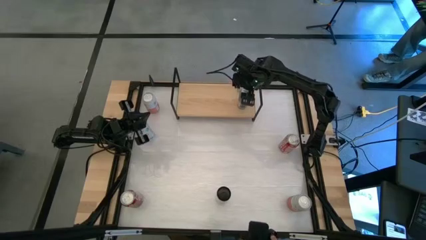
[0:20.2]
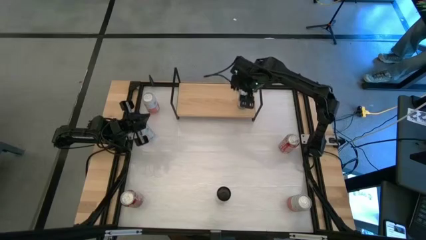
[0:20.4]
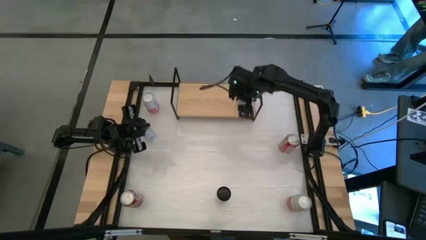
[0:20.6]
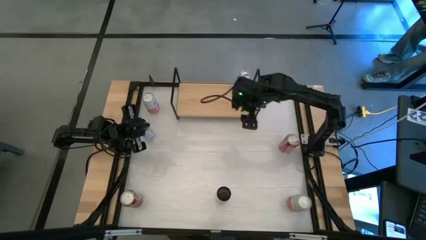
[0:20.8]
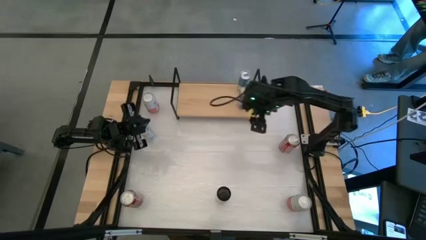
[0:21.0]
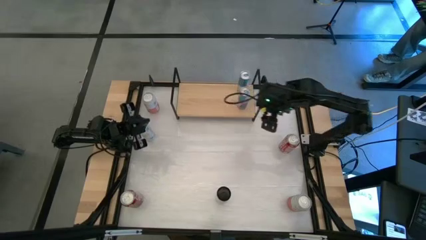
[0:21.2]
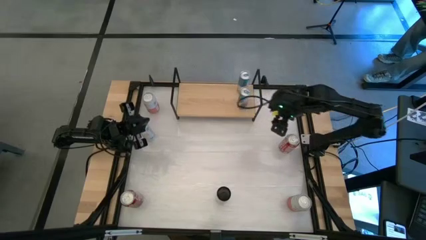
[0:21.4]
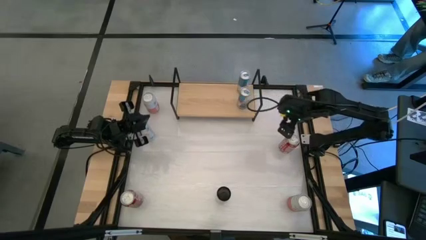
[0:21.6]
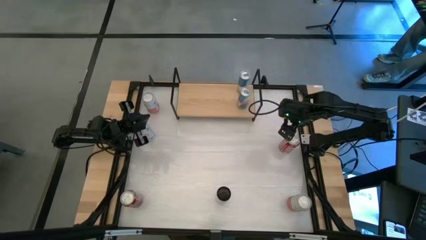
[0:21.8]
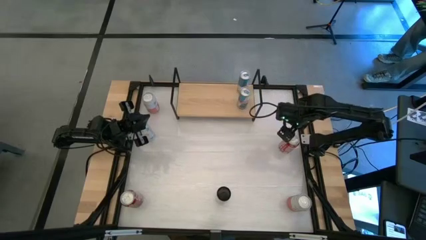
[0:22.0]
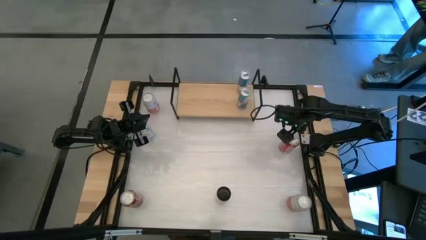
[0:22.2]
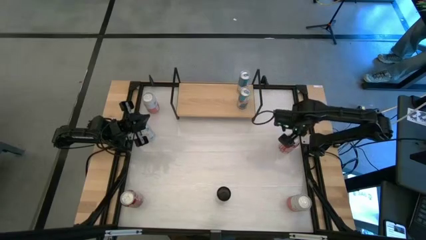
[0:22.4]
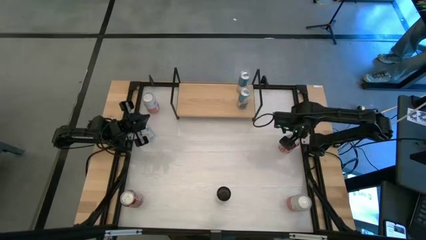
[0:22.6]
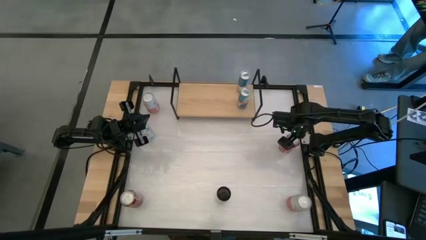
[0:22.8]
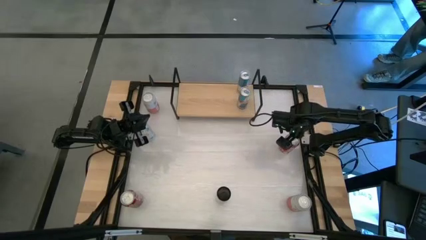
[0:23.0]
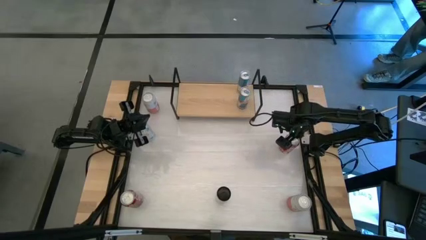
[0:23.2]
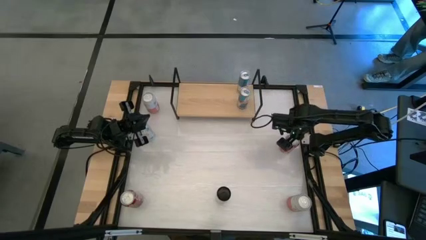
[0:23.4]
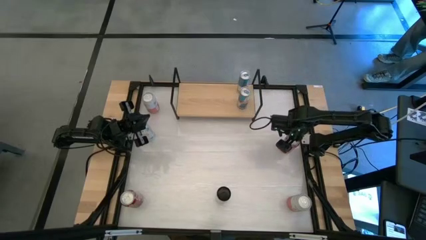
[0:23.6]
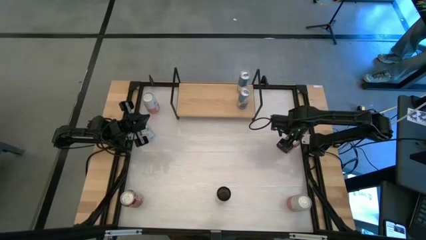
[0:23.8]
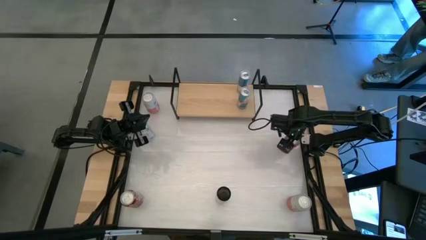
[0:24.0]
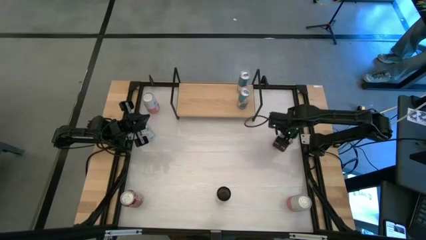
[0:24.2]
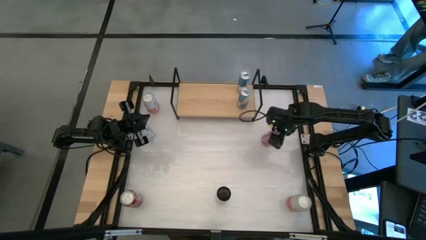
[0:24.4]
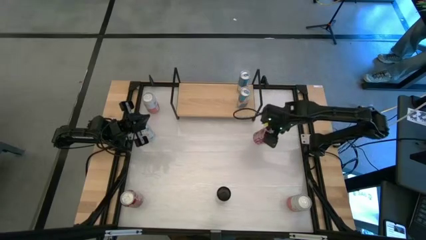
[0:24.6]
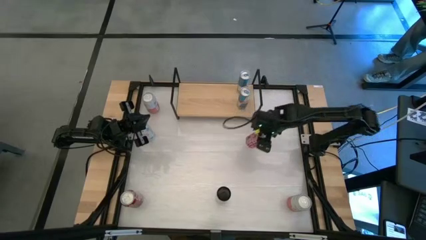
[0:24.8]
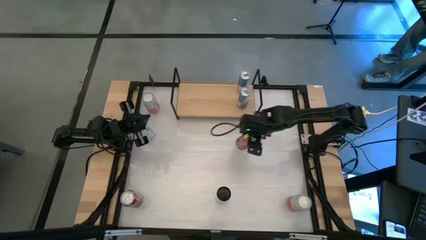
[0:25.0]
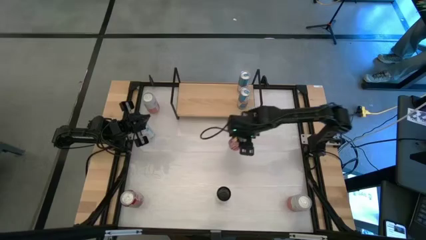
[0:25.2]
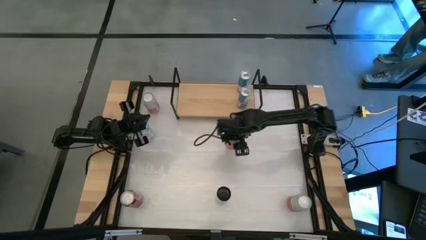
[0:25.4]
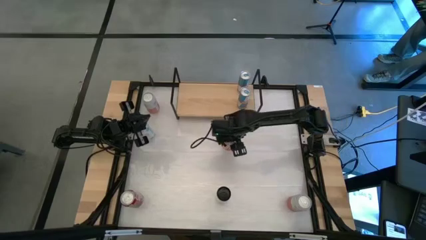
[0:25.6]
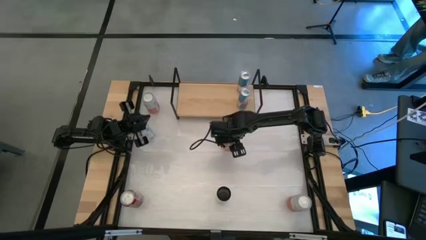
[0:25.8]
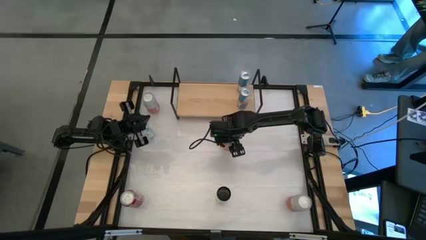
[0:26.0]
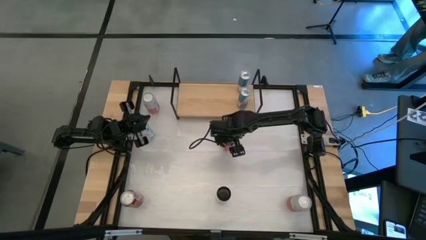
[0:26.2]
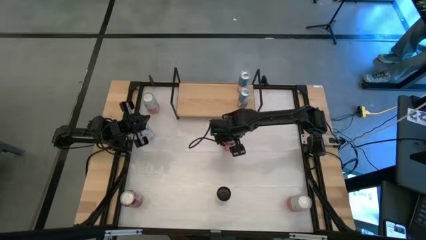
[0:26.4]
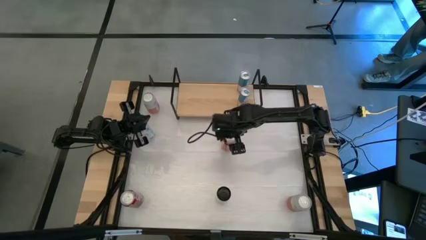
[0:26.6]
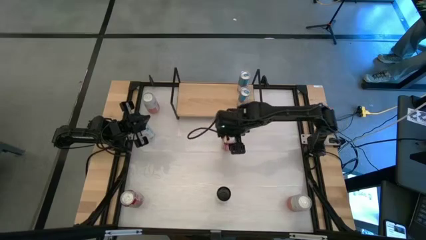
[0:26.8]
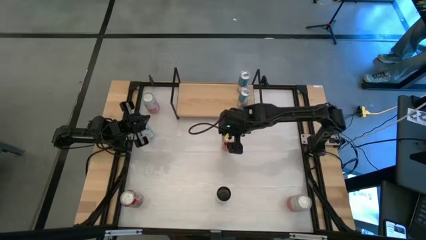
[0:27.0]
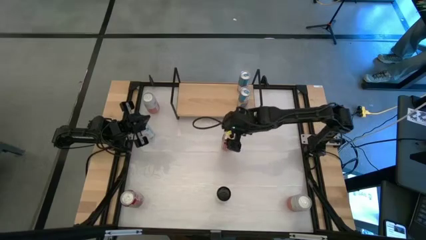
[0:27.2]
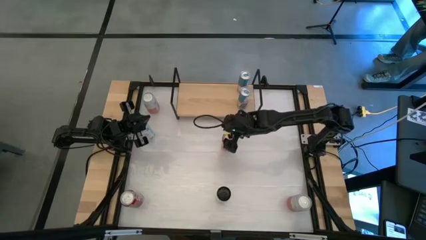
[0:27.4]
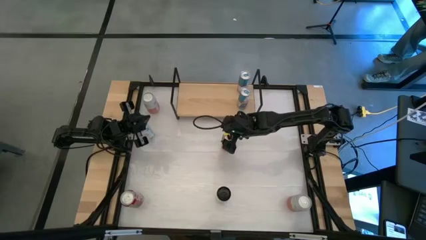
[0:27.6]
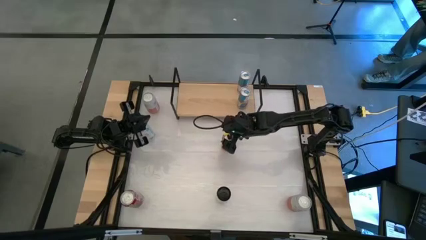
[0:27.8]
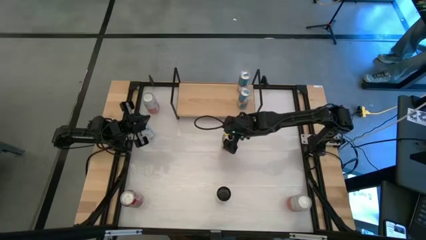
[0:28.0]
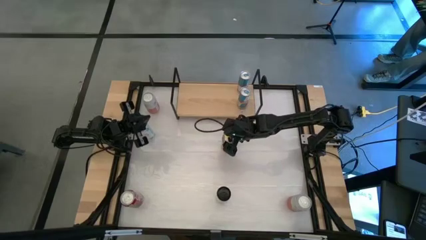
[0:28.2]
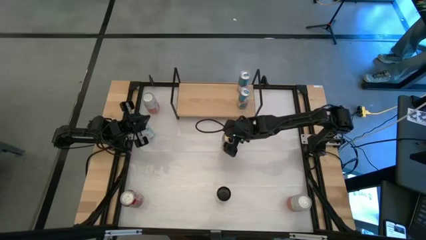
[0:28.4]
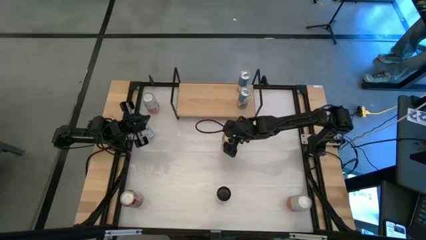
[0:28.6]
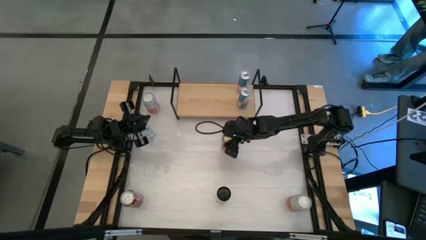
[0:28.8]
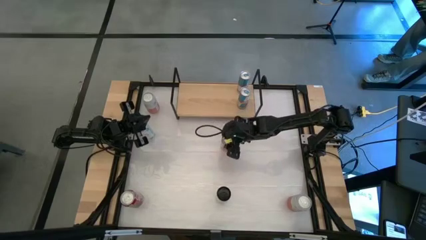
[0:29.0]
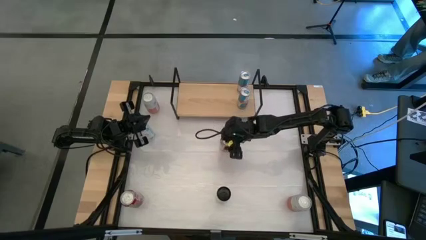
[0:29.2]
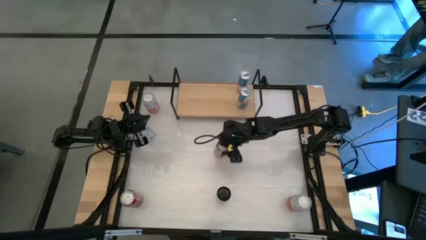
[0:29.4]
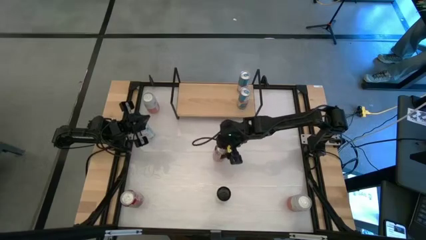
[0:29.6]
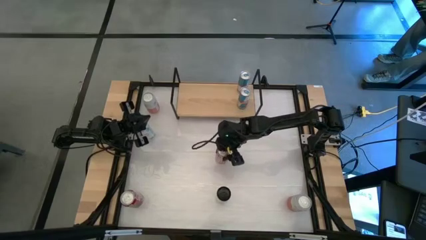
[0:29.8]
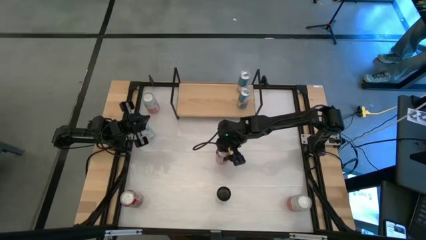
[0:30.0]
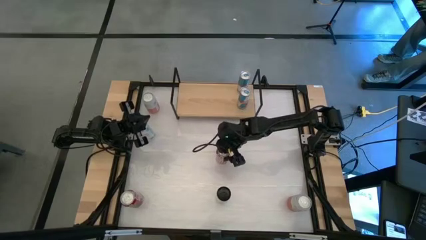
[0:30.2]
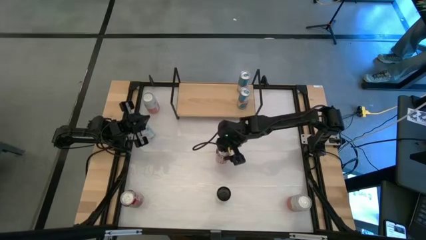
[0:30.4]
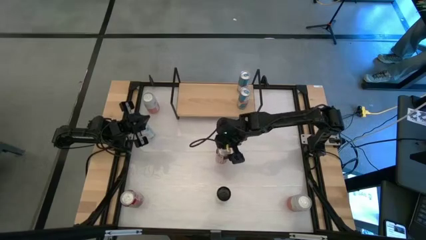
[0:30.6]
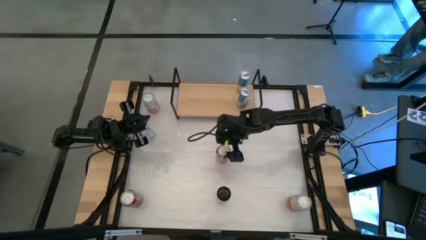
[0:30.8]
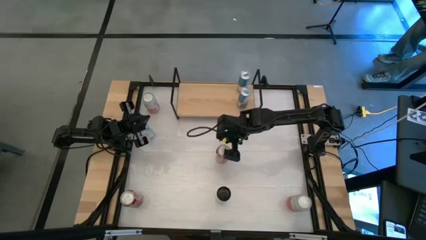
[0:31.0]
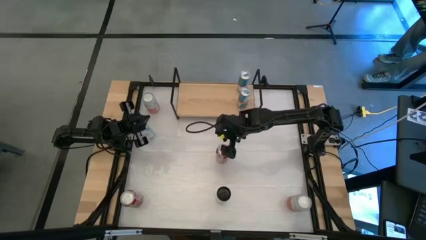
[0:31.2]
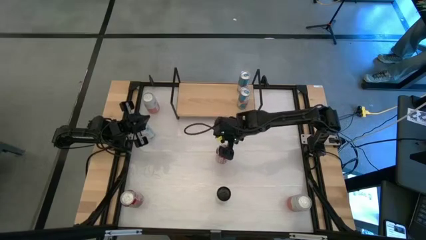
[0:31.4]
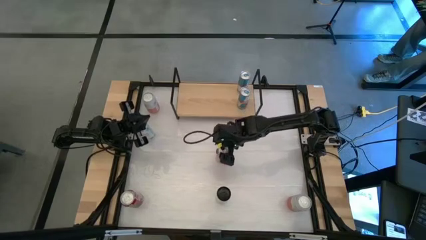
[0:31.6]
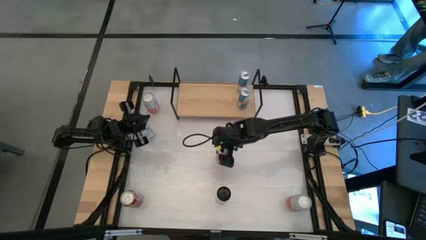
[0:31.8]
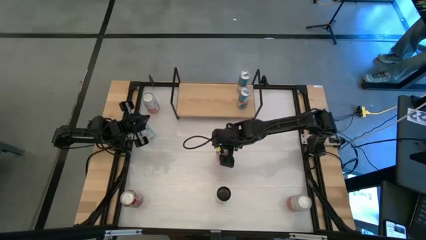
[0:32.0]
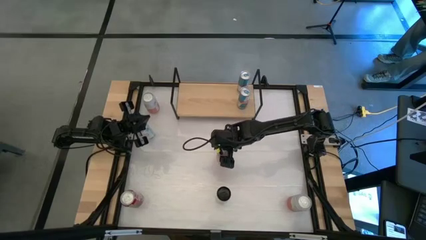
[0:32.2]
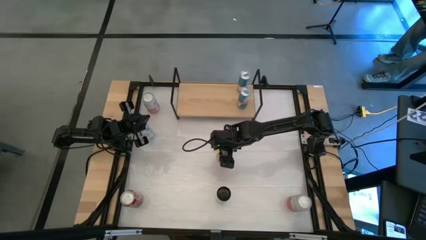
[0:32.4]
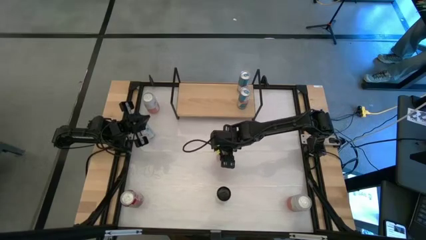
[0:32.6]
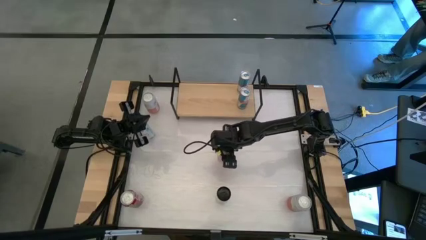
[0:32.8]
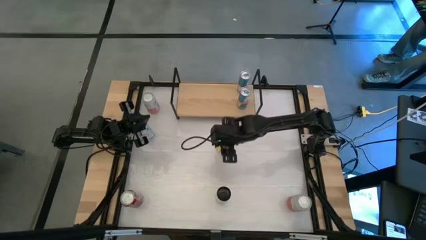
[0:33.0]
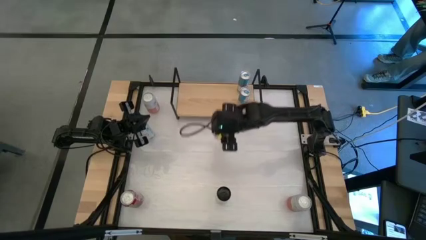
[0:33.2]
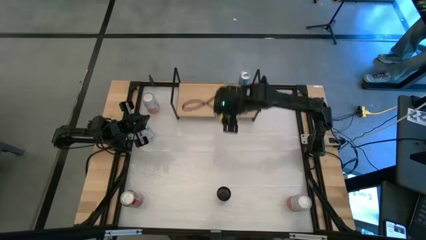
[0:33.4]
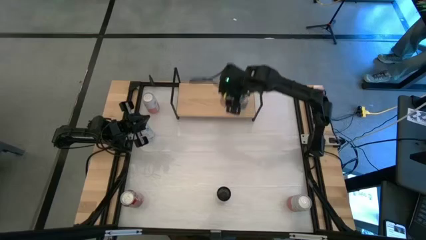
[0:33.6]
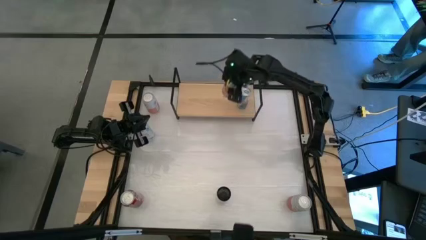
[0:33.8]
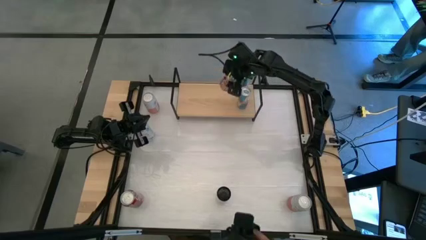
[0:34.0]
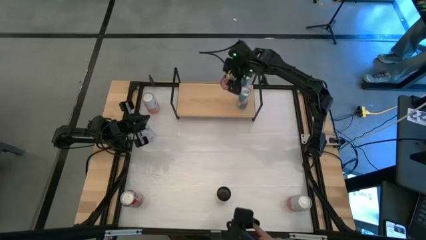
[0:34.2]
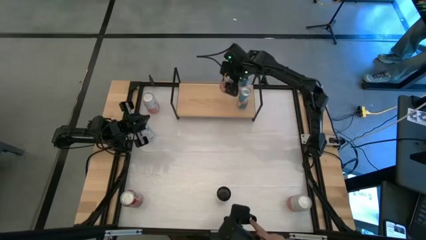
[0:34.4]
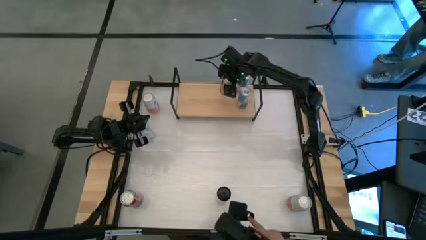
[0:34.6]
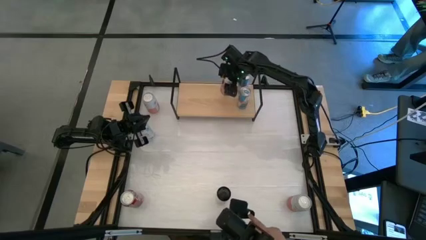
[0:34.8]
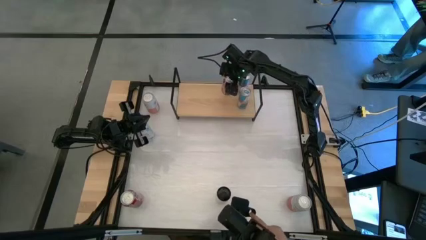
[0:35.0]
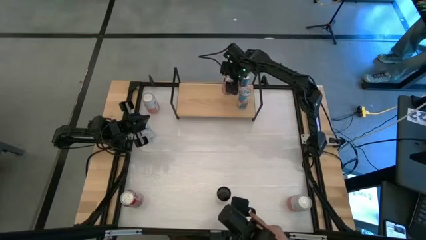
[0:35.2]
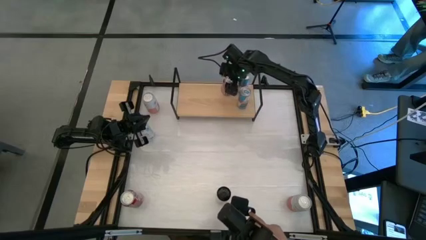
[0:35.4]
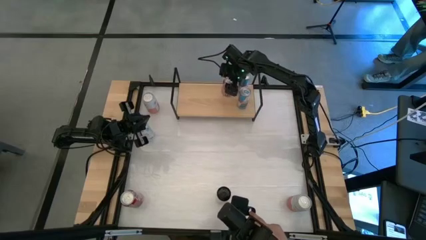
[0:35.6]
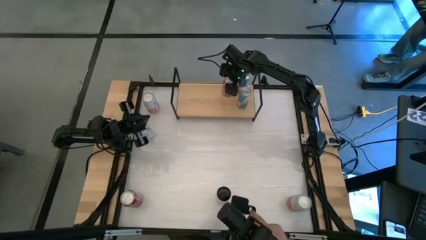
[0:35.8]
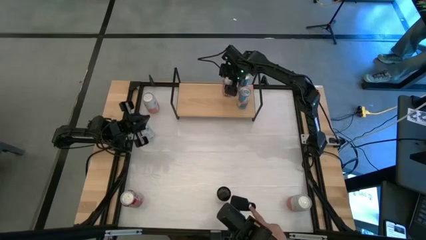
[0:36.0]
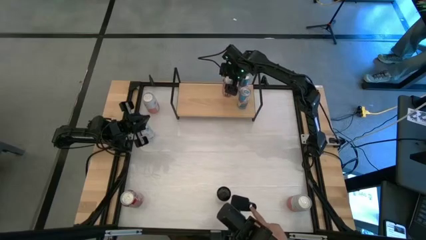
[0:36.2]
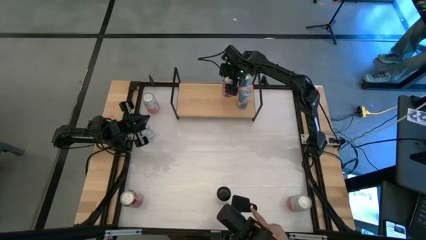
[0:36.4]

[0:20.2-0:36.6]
Task: Place canned beverage on shelf
Put the top red soda can on the shelf
